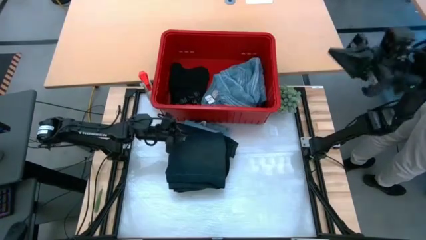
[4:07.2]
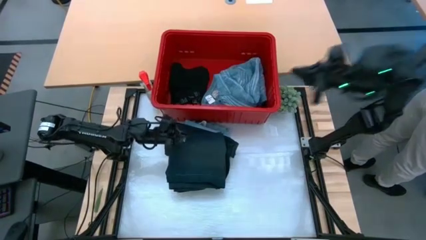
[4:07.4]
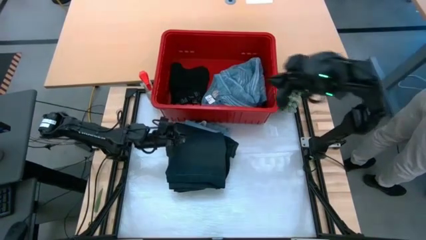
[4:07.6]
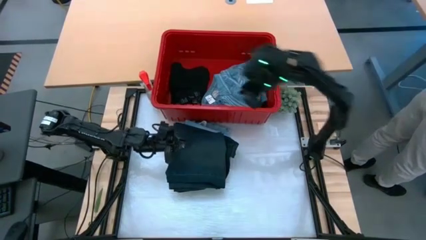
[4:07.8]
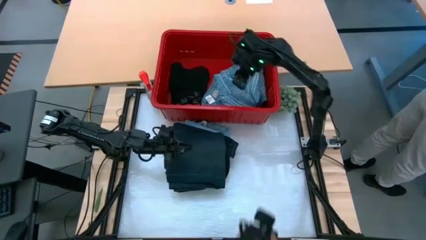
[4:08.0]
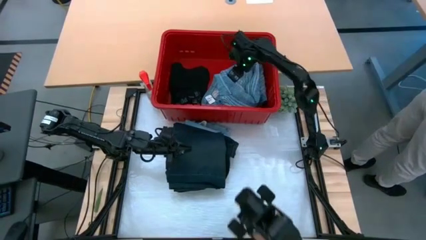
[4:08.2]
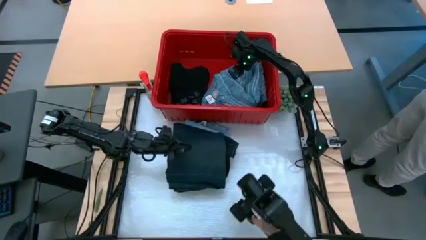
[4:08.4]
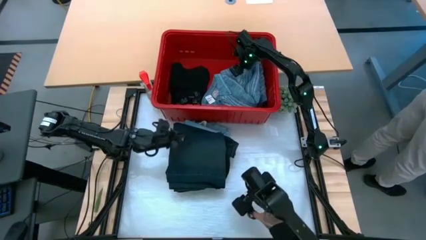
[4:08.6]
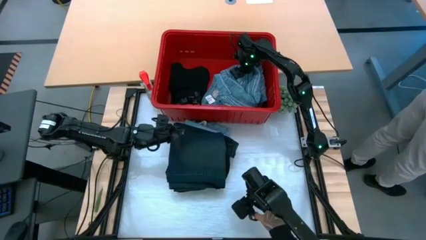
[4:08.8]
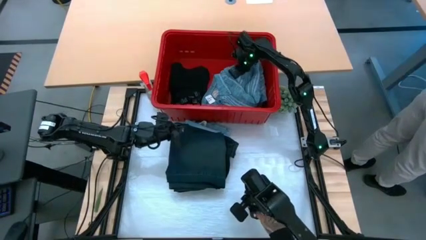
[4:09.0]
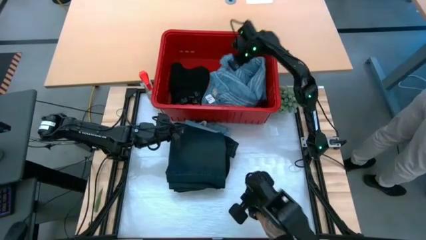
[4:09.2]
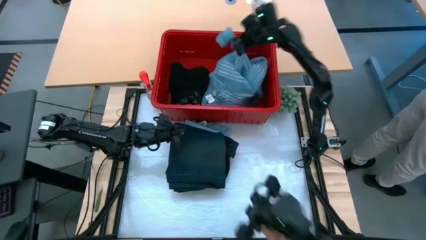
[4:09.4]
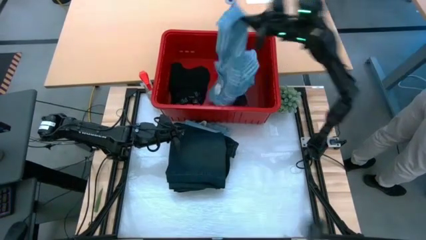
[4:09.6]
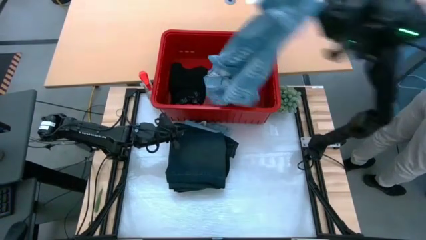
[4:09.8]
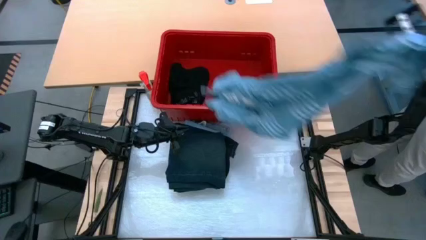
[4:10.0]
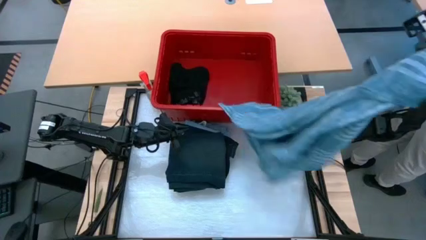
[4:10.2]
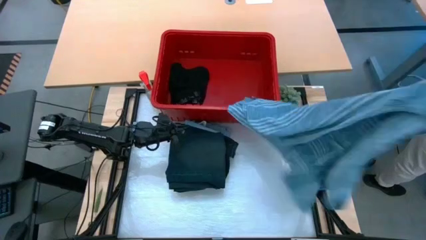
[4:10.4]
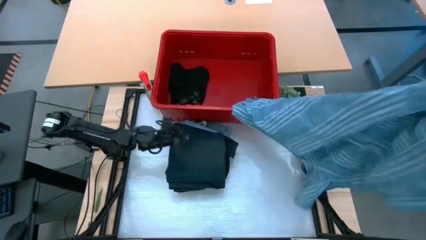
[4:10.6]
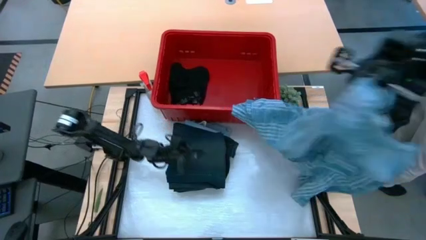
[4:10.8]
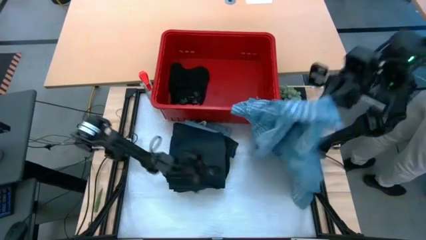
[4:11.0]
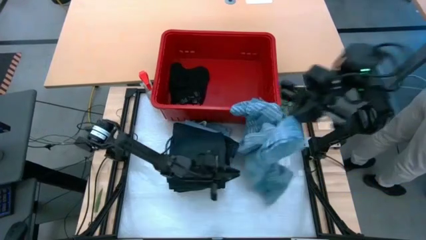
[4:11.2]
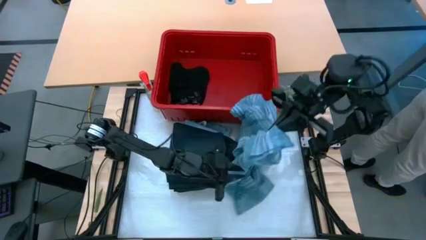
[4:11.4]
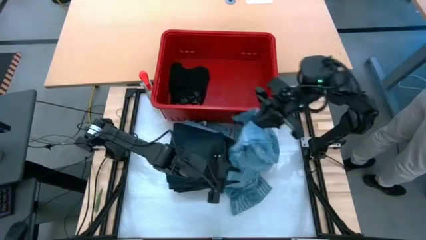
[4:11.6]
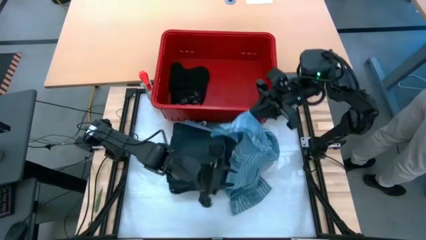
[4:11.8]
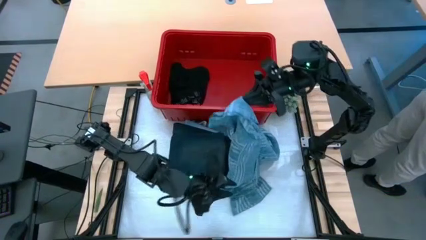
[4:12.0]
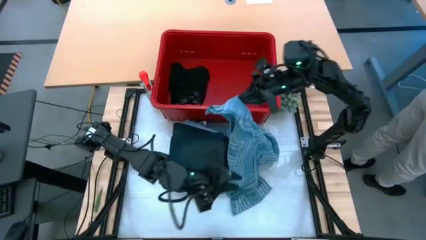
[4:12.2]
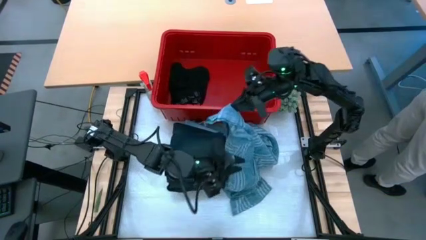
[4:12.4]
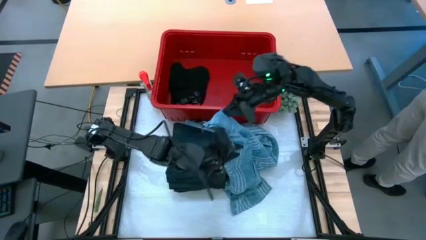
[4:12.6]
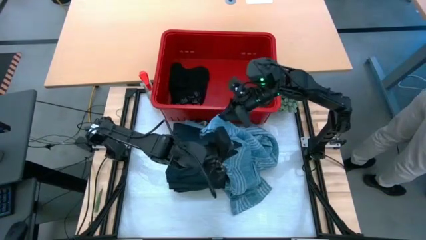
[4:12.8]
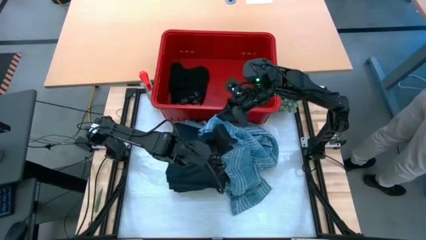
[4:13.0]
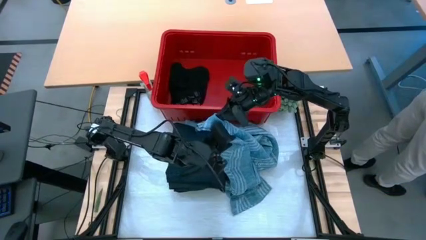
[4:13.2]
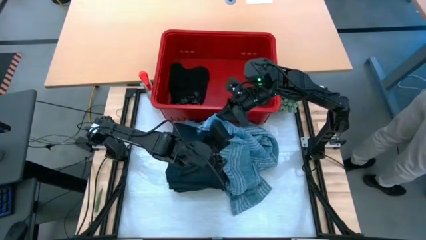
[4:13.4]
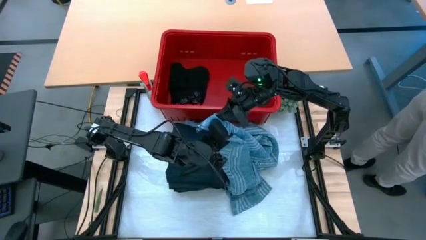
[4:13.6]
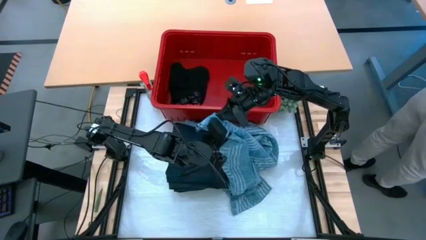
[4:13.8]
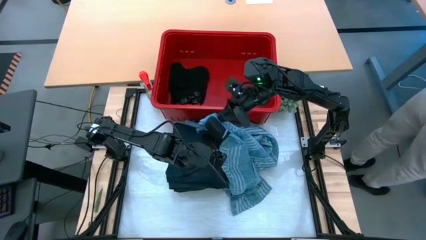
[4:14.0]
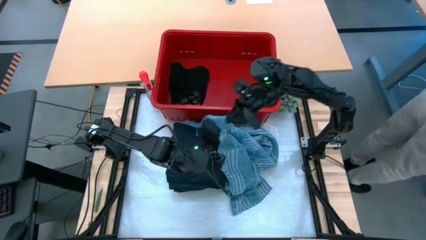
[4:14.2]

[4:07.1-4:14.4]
Task: Fold Laundry from Bin
Remove the blue and white patterned shirt from the red laundry bin

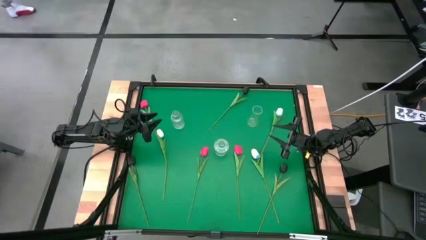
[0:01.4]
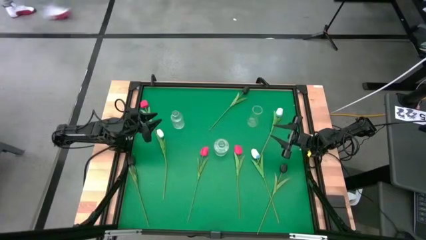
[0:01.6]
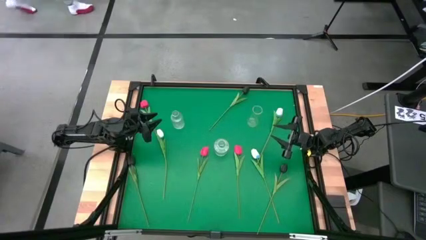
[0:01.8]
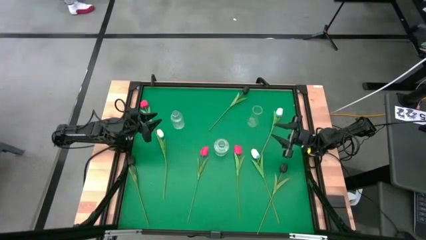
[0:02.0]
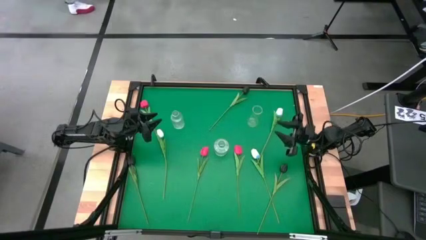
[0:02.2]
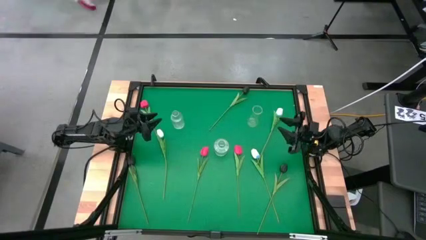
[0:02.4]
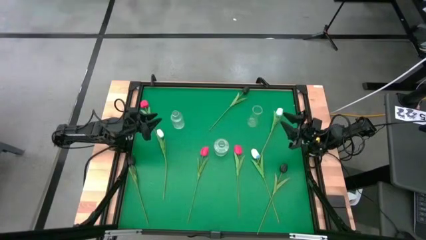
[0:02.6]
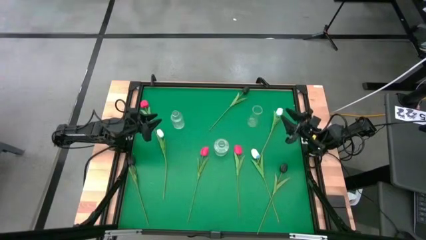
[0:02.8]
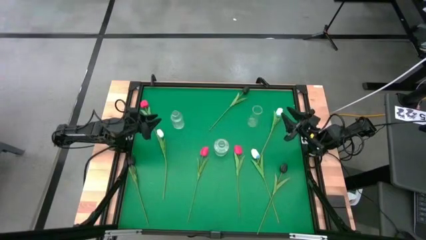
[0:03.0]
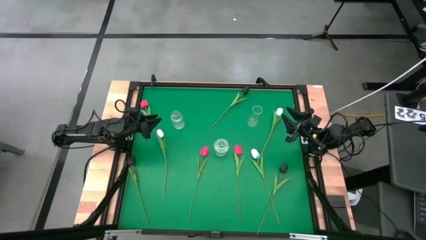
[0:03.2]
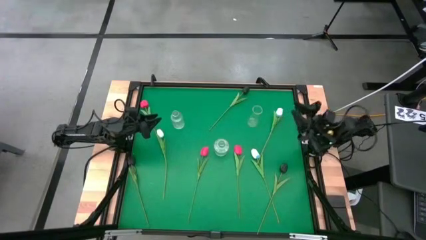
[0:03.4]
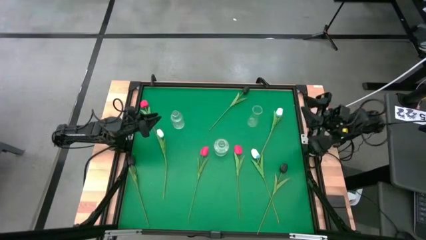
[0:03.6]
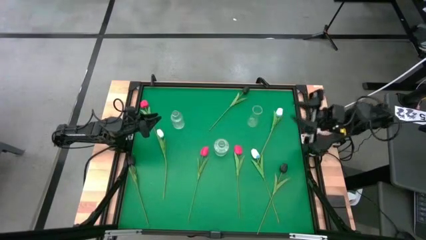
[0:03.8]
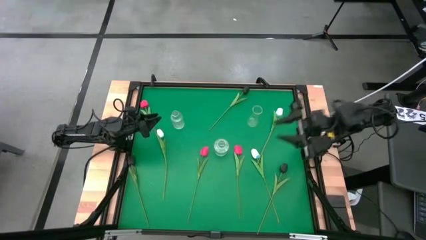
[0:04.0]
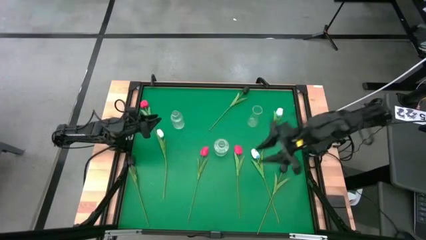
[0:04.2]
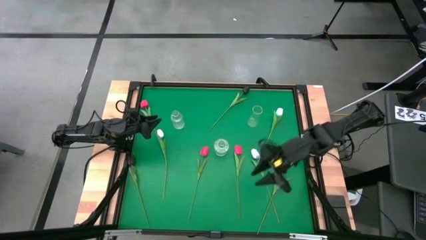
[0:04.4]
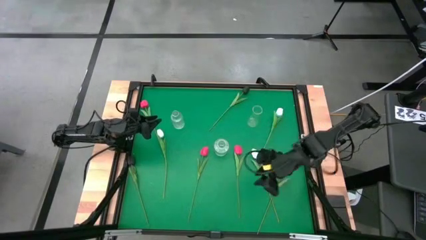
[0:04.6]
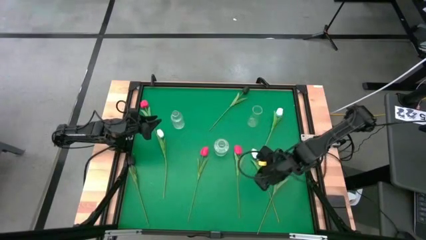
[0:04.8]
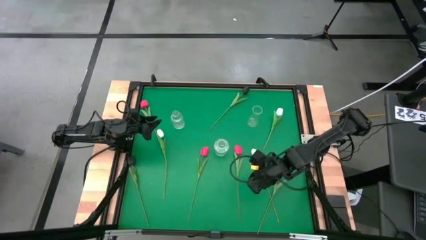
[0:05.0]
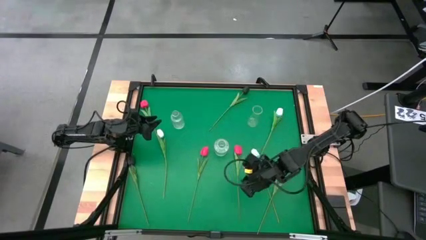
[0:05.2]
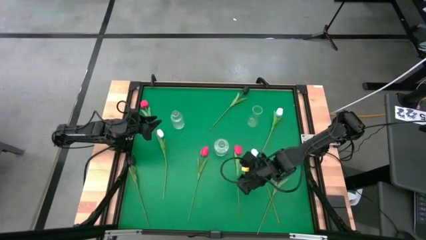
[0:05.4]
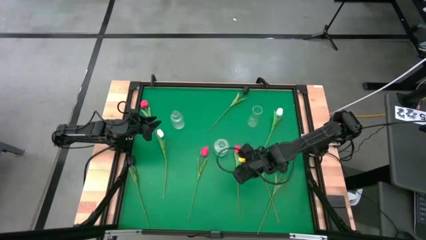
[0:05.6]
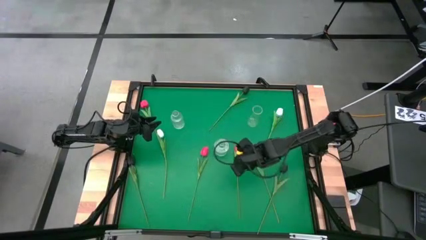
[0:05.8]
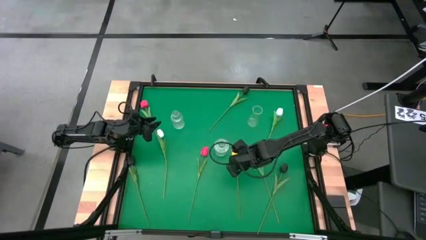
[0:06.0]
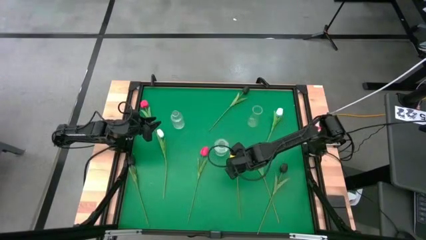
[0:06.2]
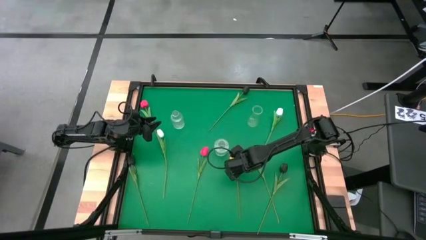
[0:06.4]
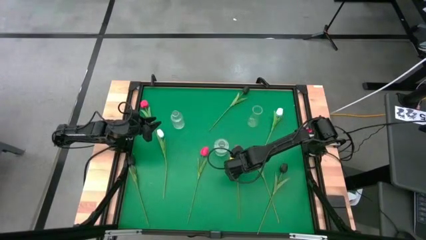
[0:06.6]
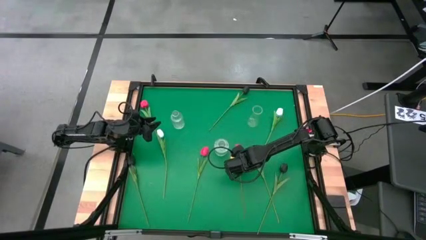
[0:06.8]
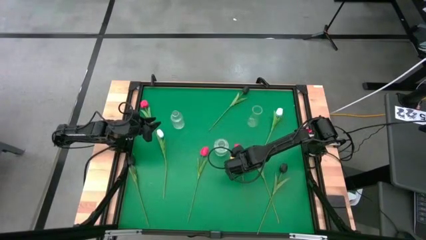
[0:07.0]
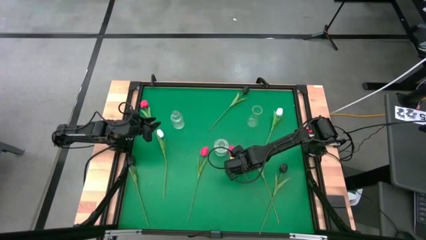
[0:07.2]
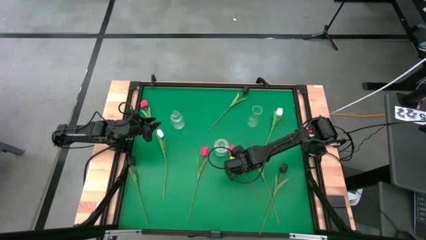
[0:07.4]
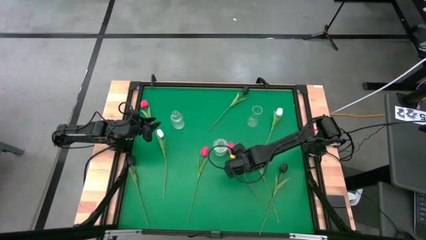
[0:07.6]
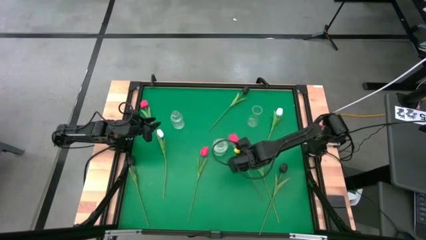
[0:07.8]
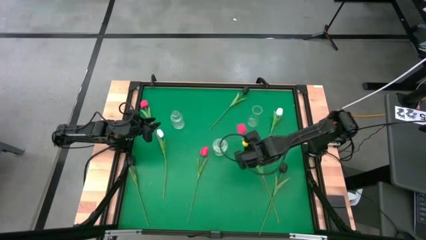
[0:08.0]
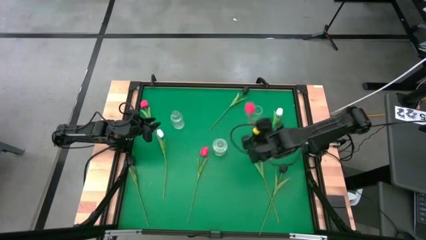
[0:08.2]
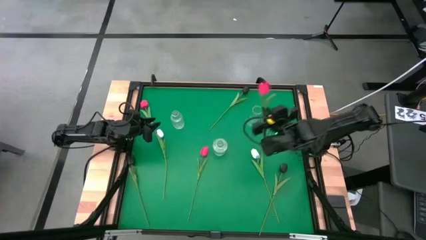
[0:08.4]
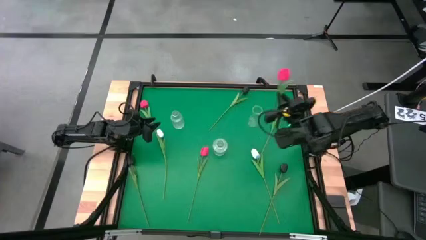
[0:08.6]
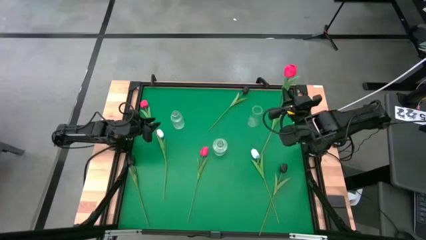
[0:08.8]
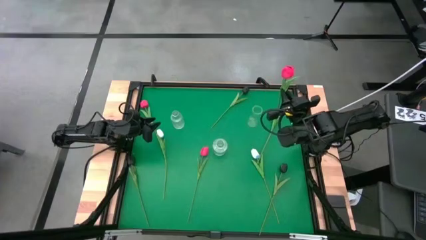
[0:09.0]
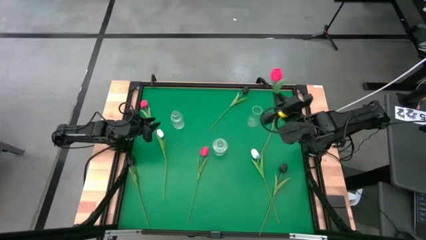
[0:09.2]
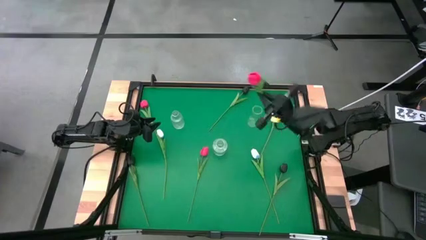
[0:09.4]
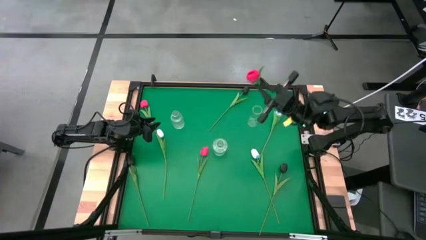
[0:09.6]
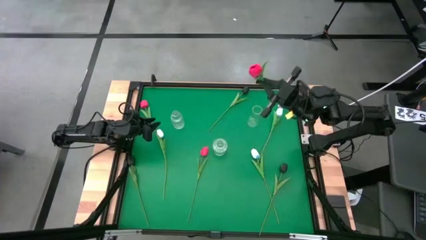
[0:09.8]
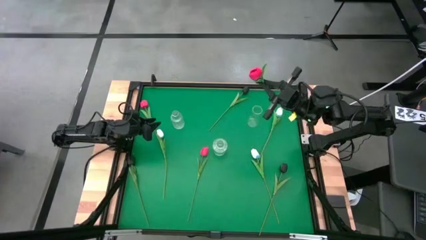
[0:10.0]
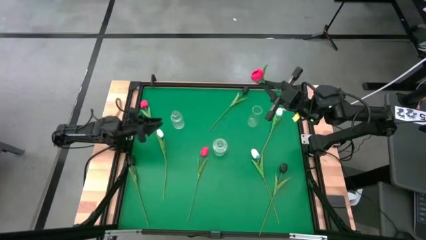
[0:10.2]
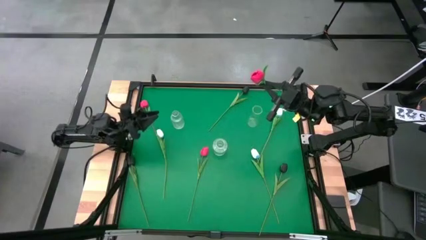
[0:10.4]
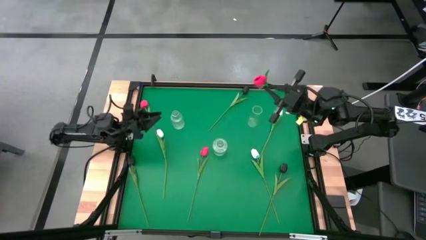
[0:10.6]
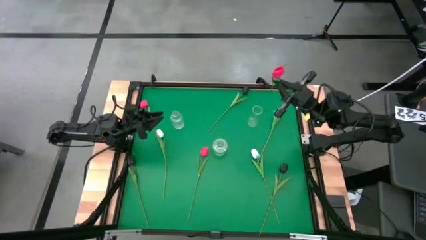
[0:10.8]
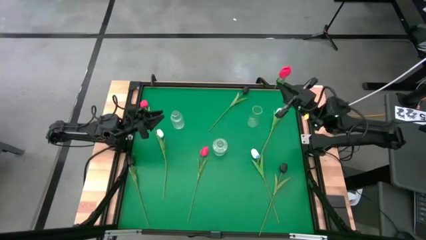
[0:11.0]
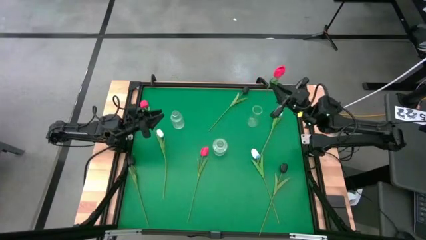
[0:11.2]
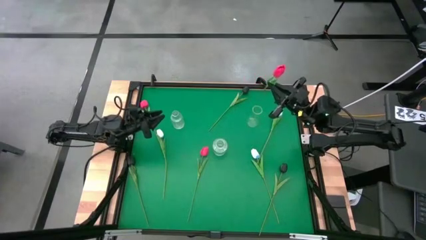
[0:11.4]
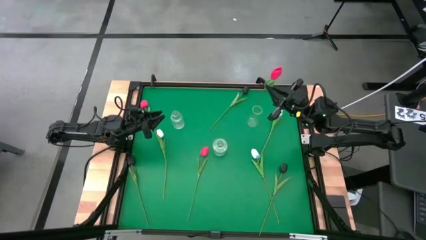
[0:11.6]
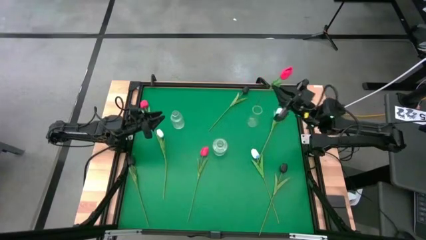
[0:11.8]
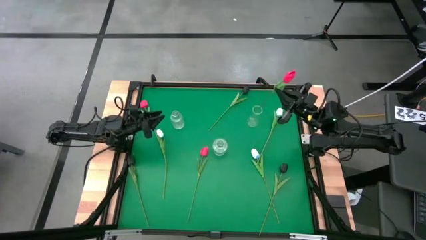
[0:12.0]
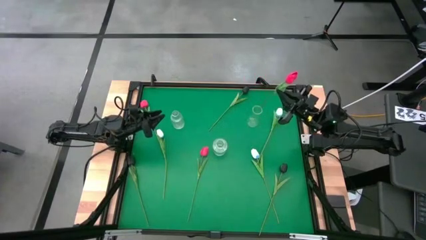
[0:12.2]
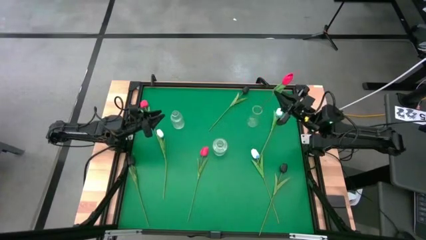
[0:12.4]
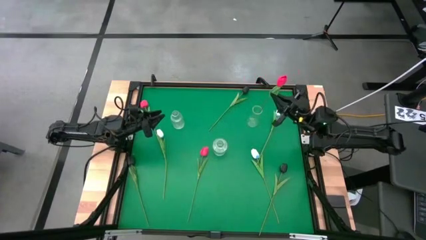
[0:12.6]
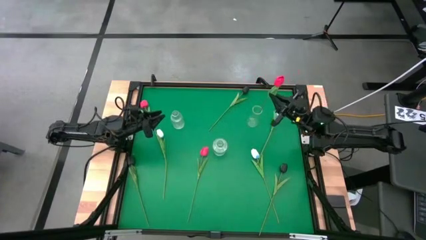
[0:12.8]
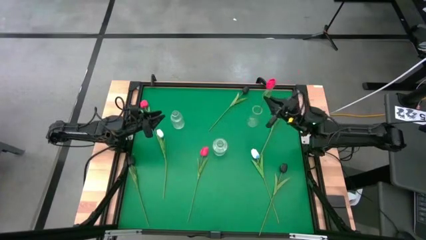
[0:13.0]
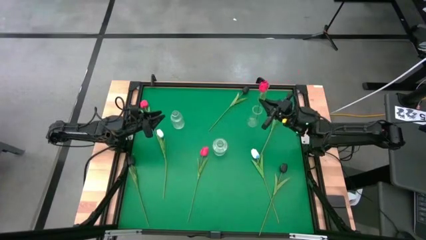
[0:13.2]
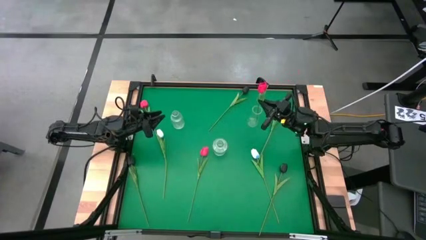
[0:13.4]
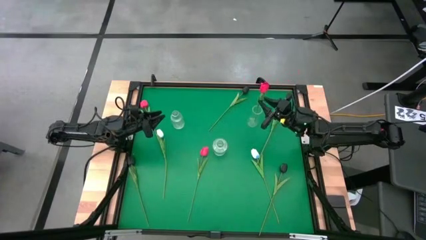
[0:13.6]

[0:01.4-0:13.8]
Task: Sort flowers into vase by color
Put the right red tulip into the right transparent vase
